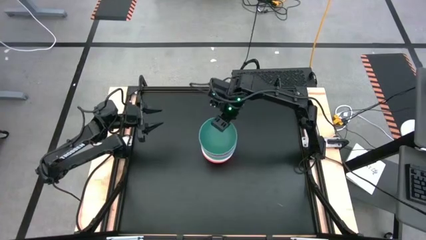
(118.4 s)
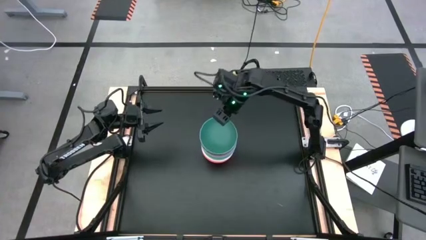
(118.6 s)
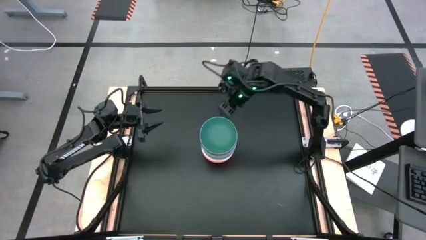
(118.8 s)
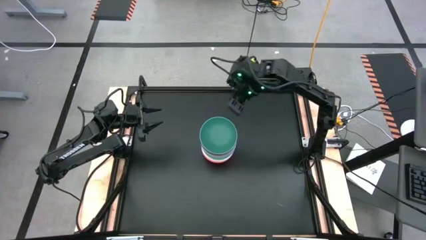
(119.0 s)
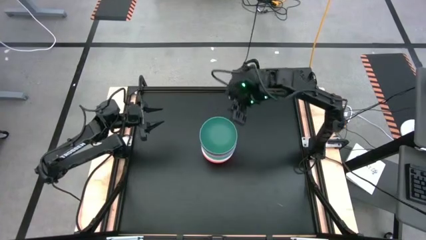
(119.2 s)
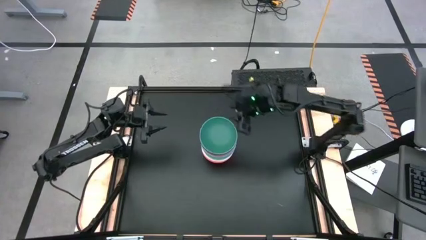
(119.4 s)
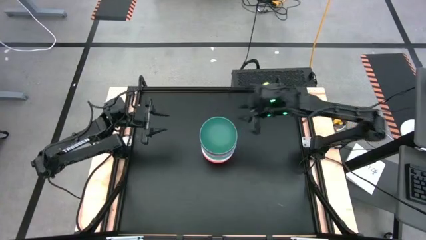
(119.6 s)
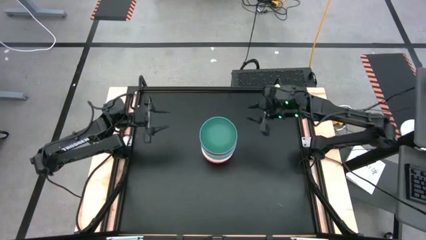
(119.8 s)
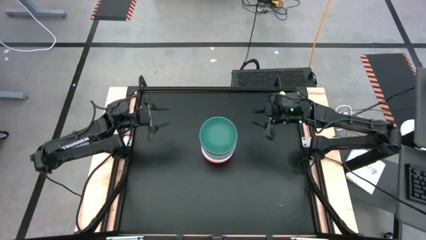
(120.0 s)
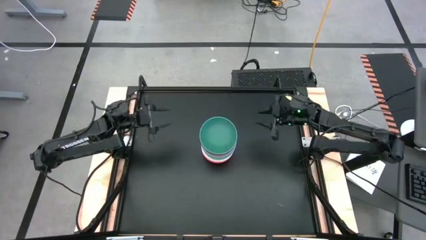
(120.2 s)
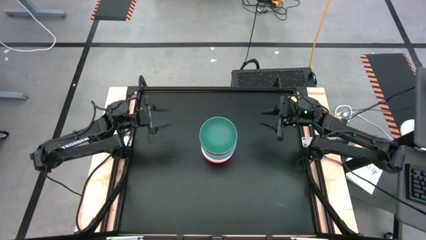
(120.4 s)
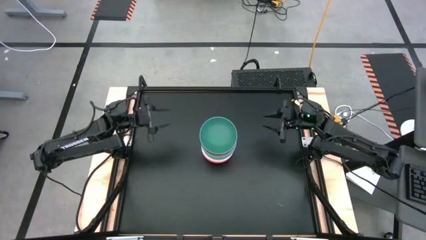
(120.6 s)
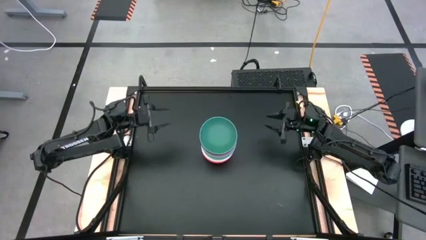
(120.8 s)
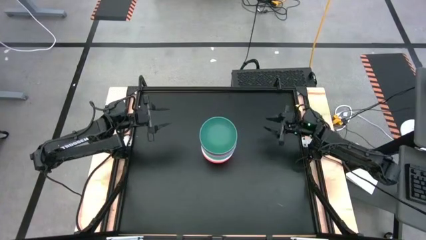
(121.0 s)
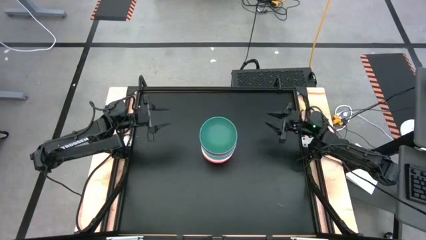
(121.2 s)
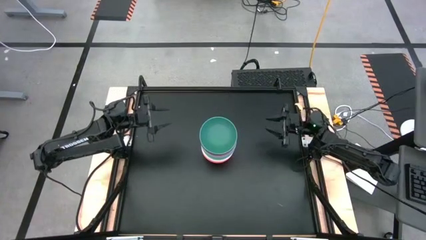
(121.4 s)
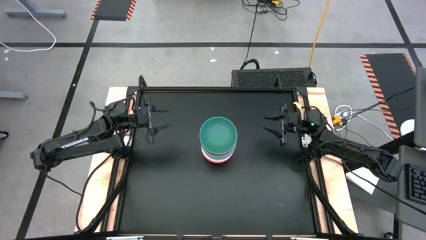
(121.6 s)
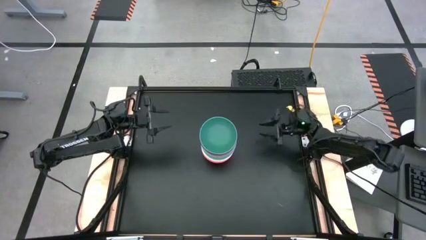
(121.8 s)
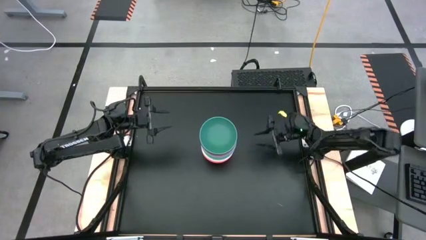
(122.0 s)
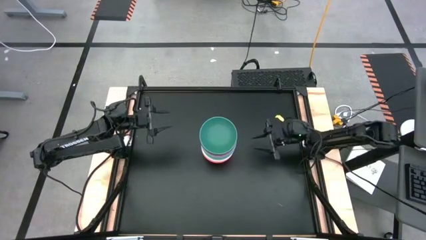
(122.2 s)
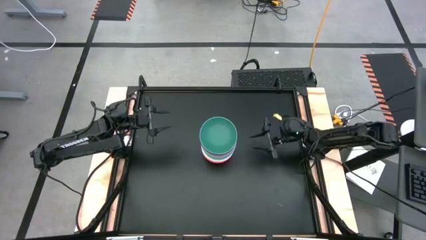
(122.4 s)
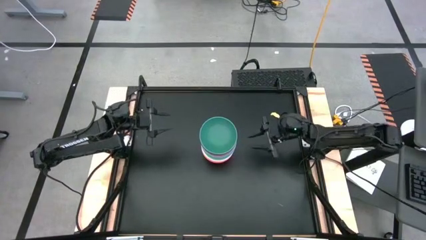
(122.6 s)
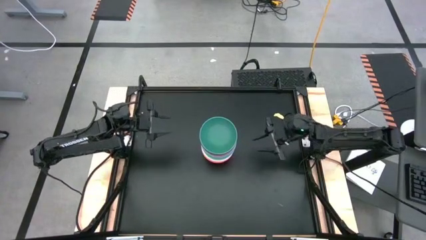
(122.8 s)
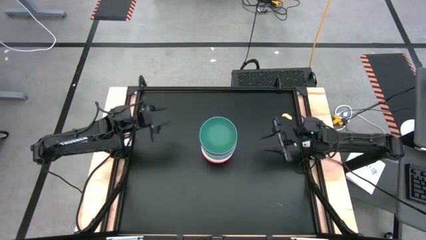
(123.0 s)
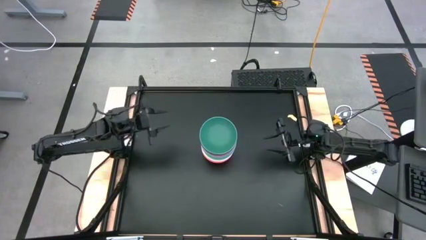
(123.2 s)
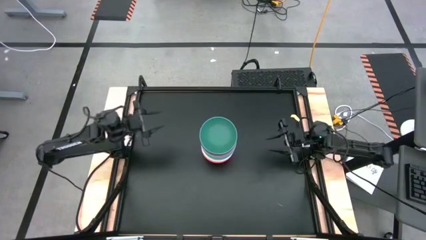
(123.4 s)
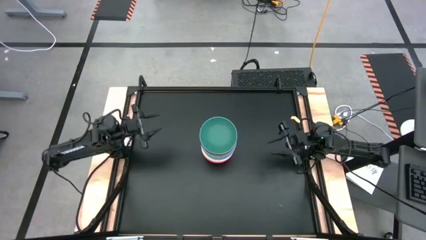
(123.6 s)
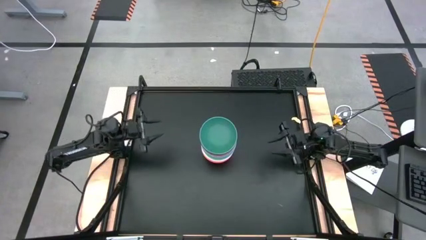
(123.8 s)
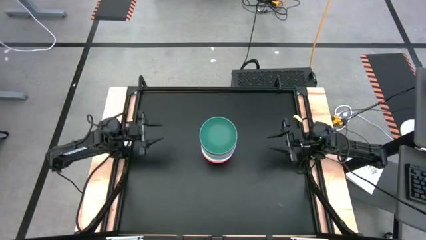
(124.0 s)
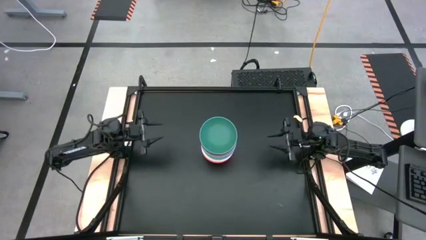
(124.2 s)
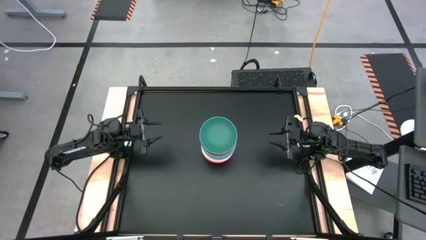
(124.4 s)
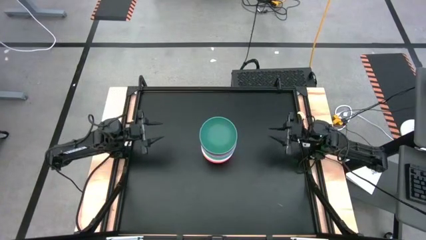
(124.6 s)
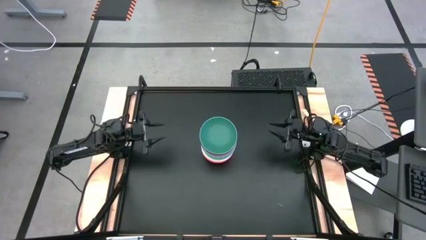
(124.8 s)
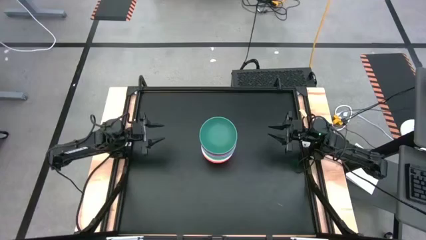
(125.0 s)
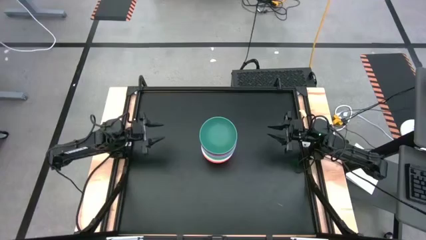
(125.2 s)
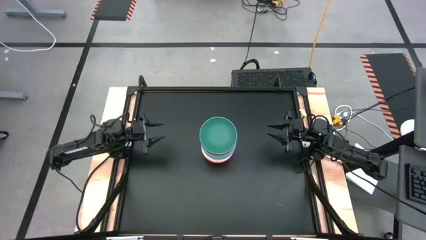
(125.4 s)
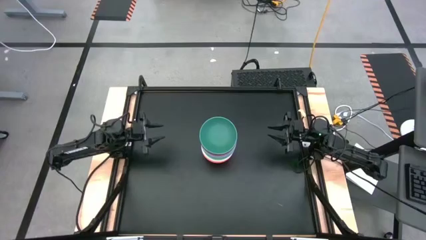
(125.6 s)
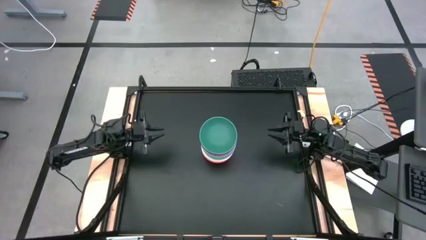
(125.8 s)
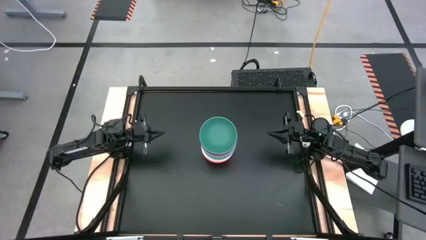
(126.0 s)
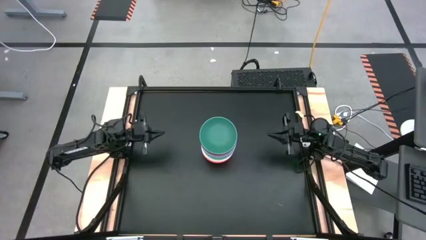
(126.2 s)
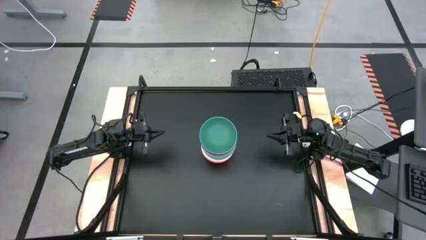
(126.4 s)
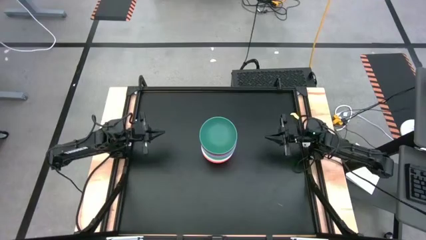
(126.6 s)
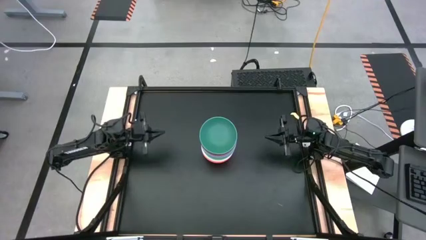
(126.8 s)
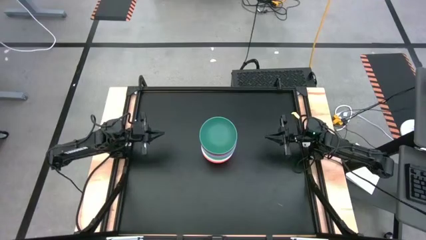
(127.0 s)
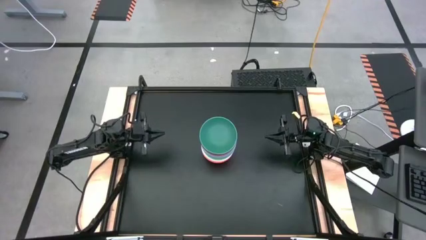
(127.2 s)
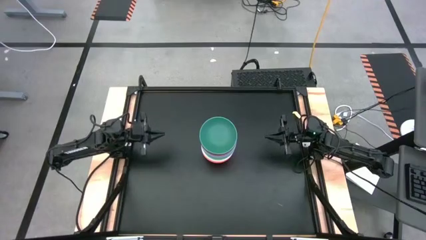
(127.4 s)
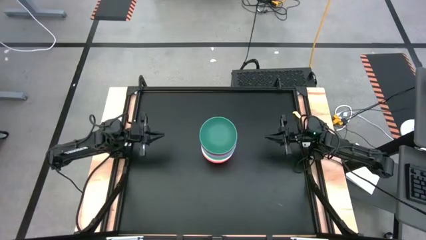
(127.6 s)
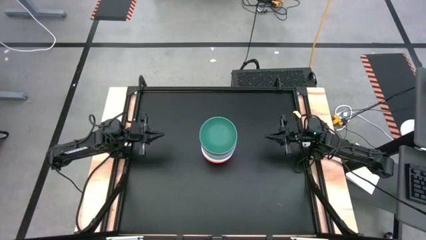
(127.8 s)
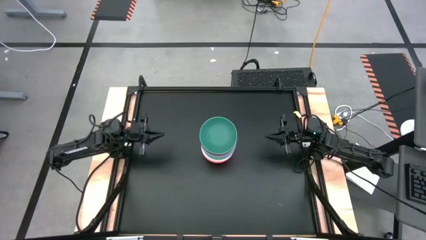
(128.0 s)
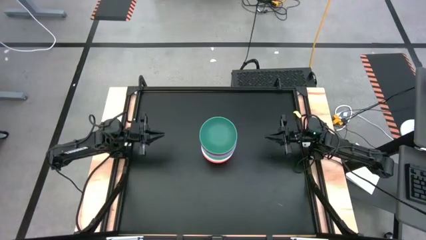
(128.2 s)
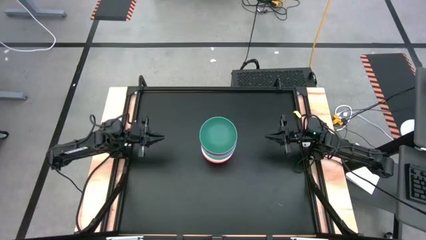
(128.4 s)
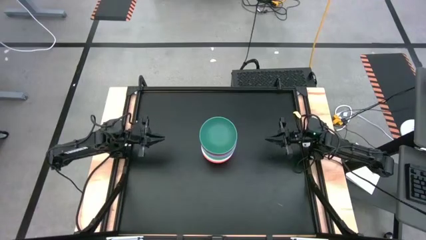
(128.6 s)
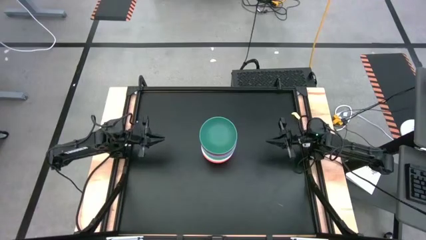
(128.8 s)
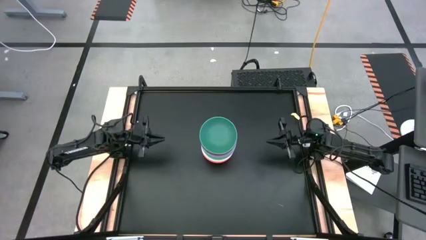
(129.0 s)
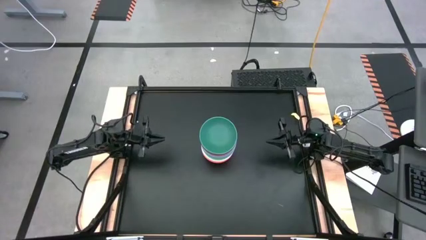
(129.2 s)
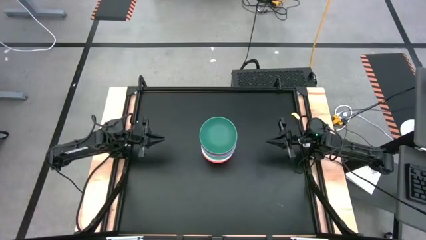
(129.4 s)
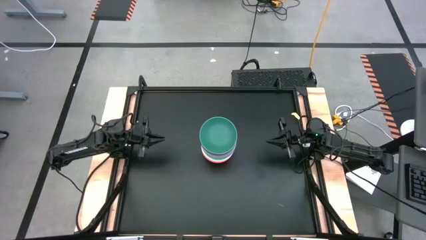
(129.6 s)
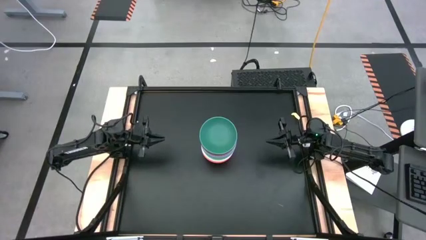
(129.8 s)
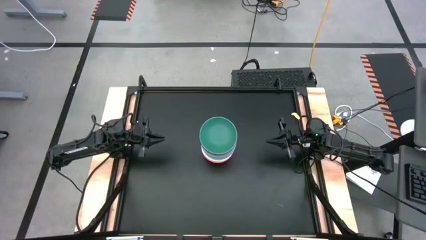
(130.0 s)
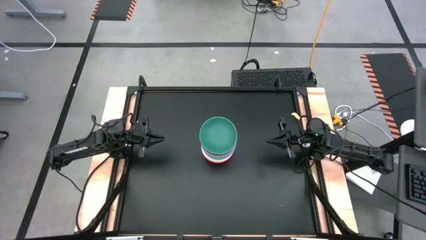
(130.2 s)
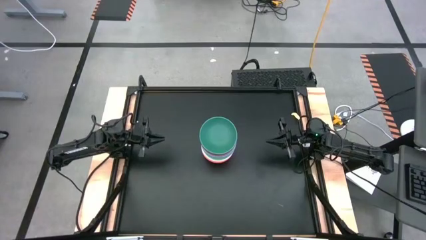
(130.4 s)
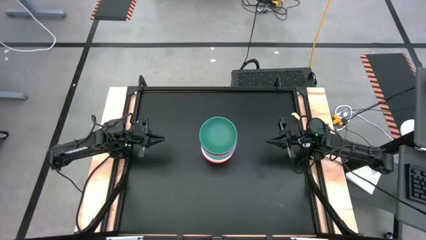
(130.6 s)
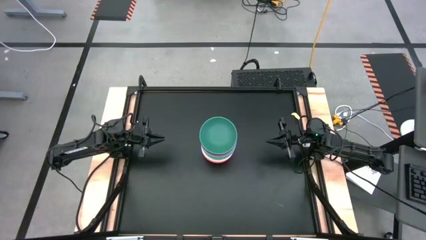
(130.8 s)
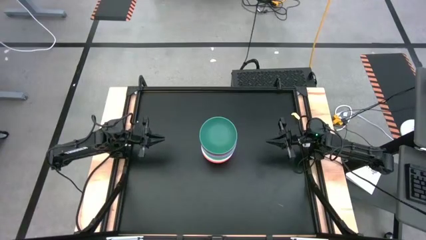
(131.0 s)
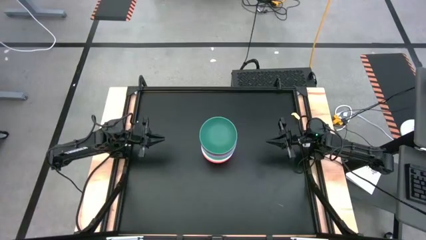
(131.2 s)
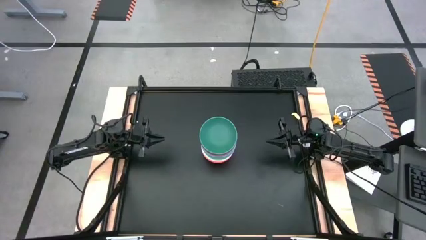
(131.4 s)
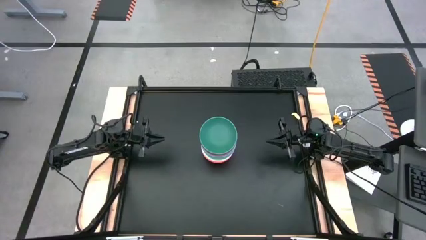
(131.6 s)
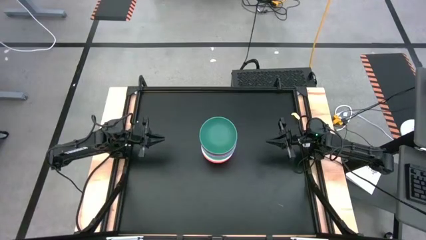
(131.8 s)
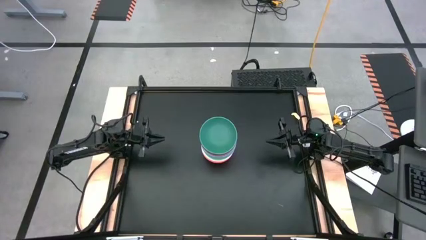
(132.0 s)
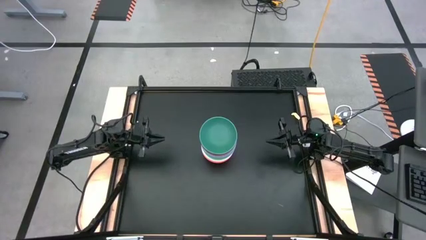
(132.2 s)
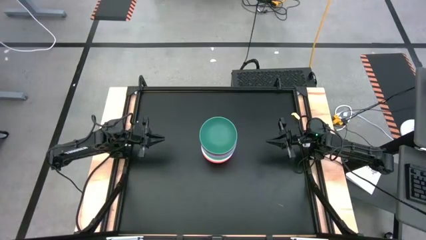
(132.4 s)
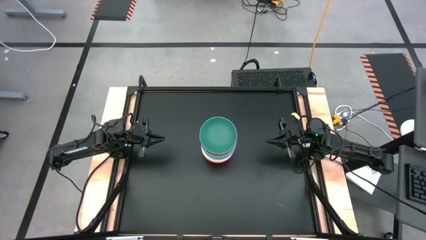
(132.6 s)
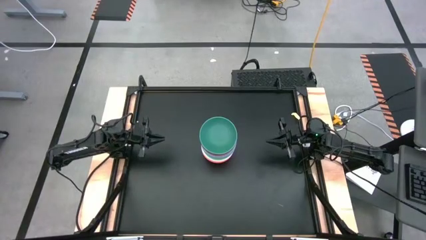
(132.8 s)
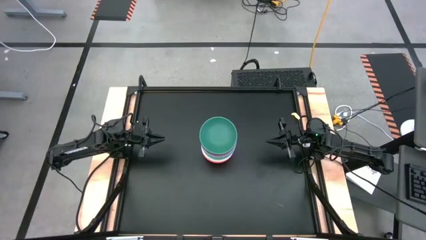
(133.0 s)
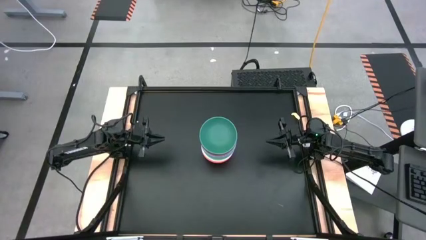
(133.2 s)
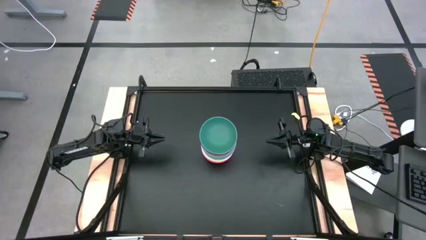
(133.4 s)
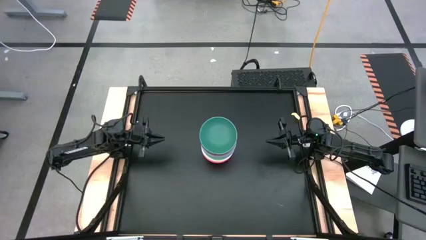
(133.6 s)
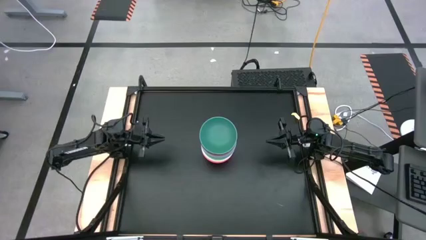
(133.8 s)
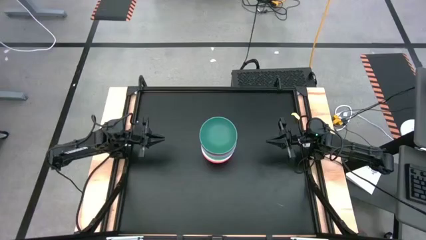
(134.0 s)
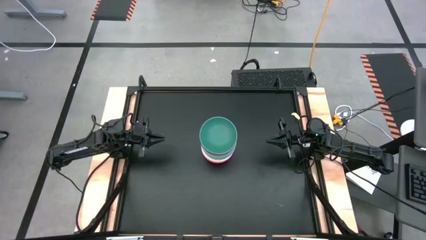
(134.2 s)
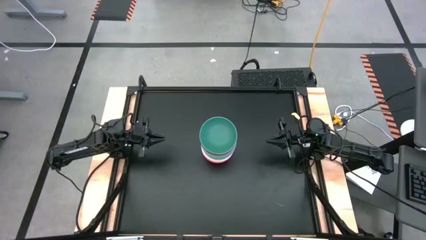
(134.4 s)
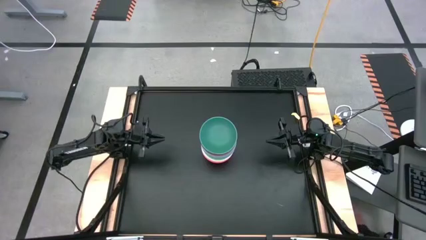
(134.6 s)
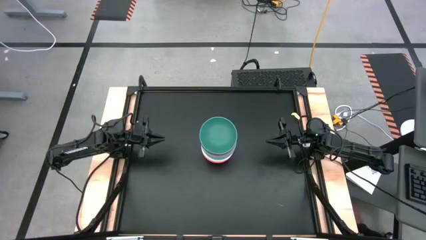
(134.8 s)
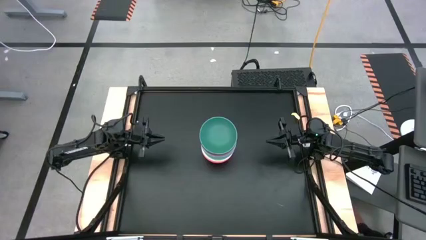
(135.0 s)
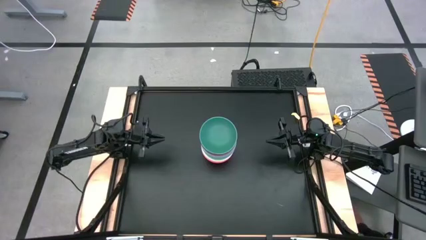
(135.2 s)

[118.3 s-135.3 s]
Task: Nest bowls inside each other
Return to Home Position
